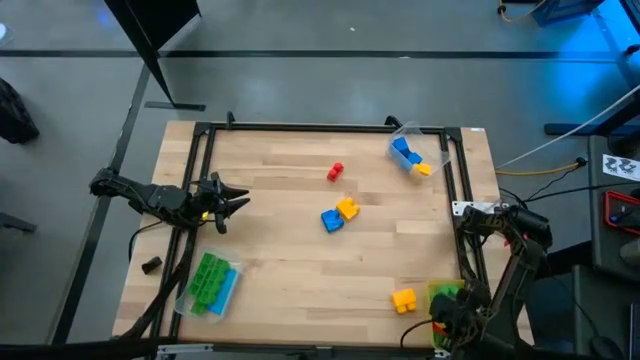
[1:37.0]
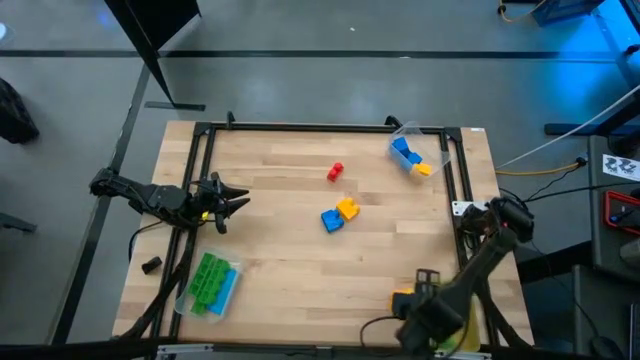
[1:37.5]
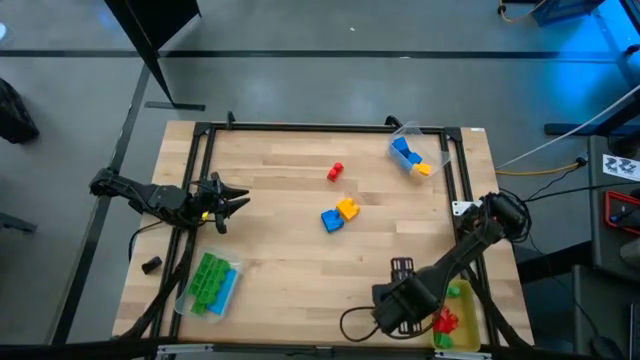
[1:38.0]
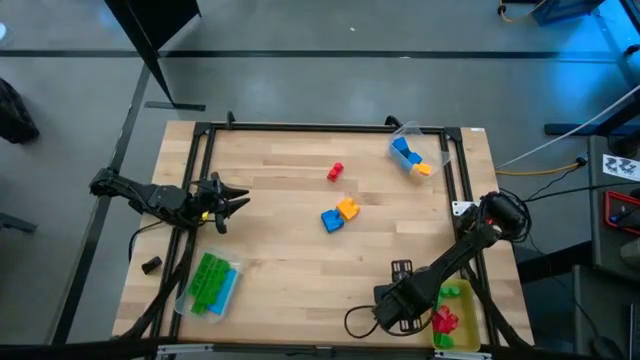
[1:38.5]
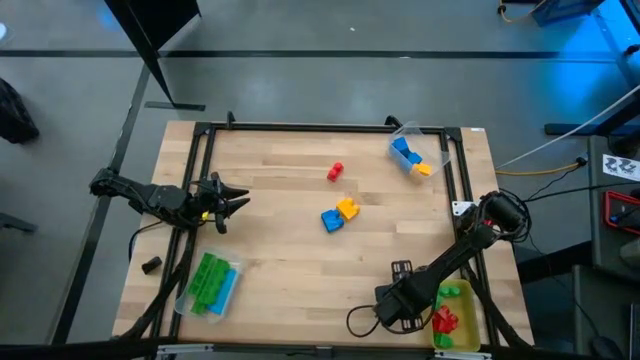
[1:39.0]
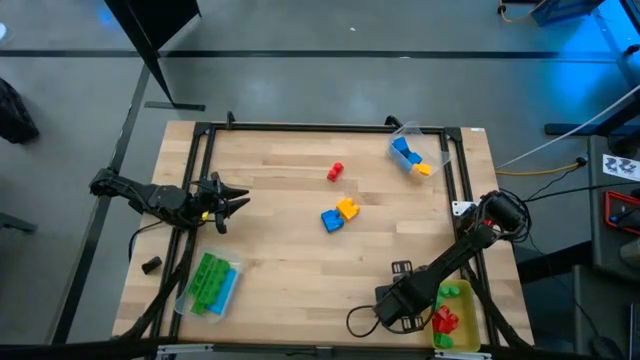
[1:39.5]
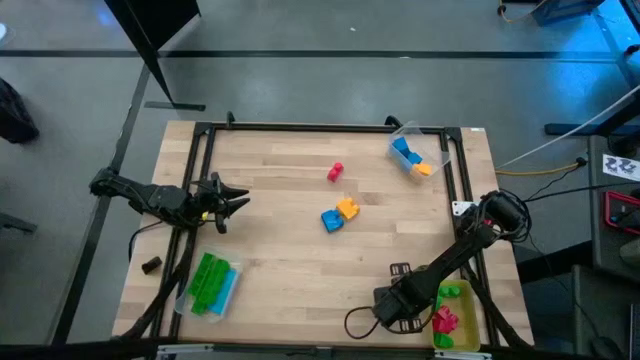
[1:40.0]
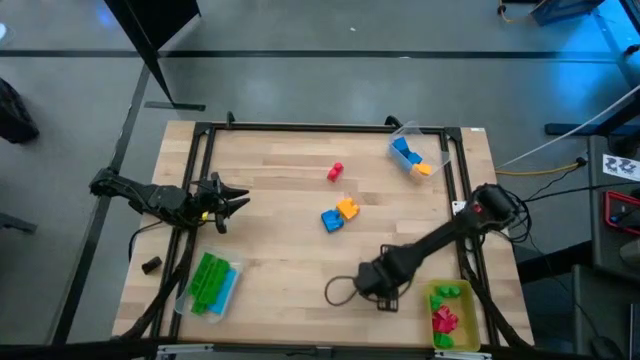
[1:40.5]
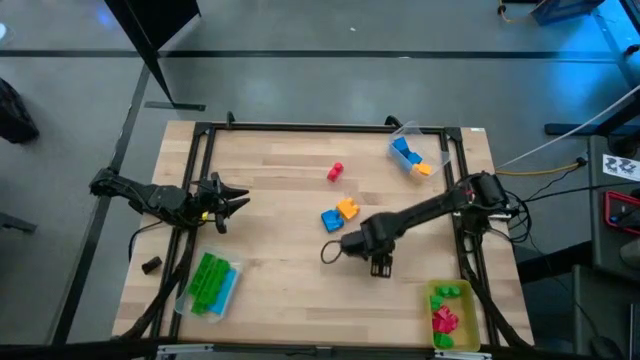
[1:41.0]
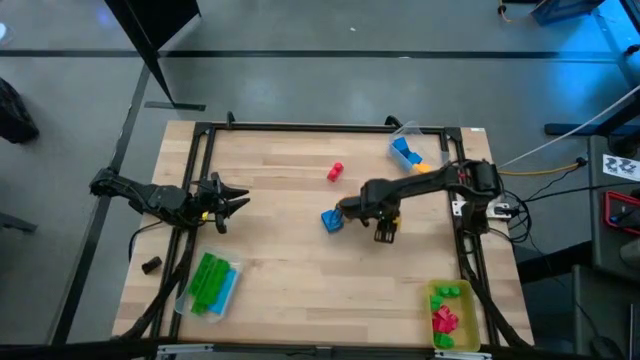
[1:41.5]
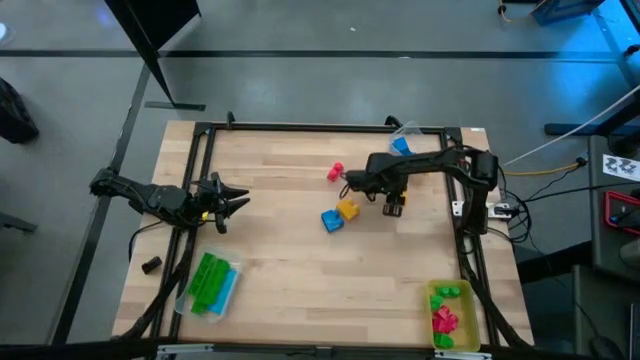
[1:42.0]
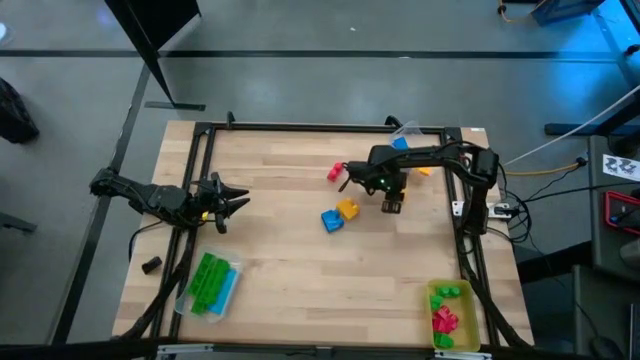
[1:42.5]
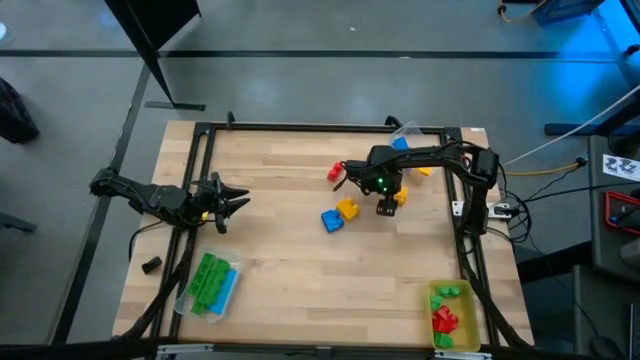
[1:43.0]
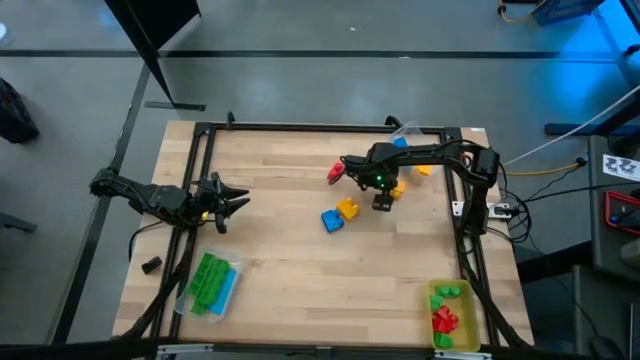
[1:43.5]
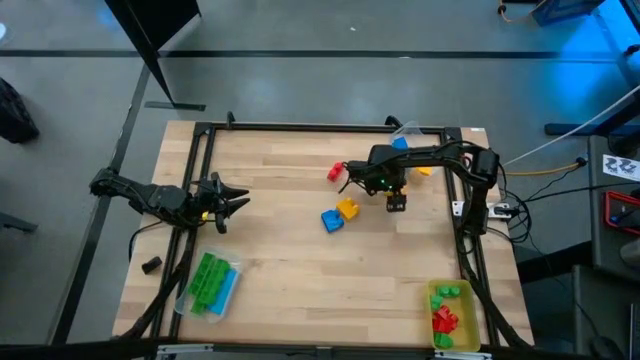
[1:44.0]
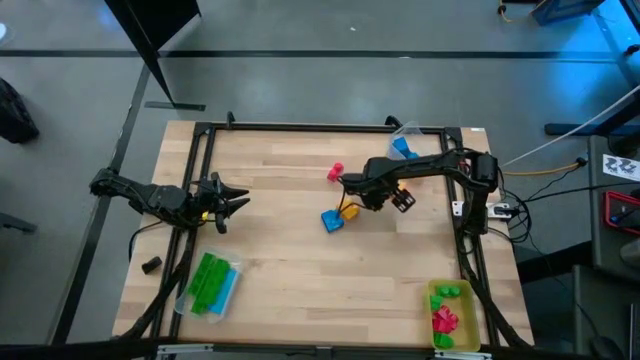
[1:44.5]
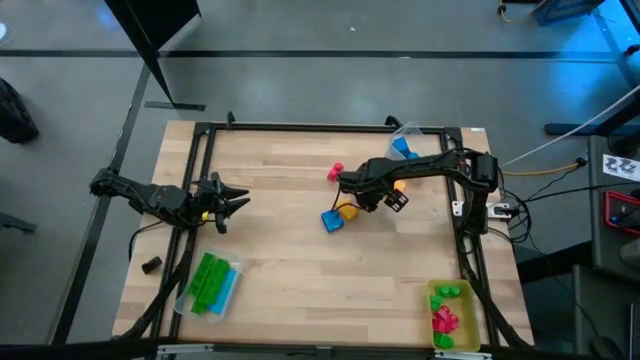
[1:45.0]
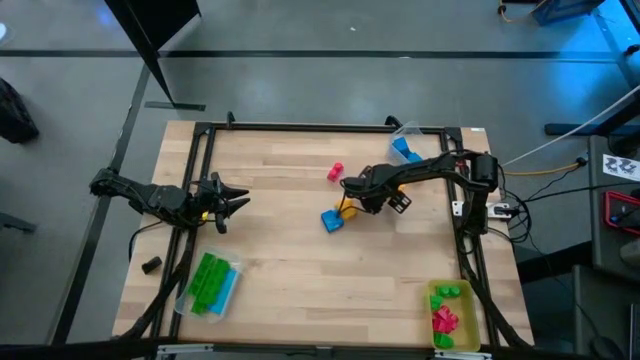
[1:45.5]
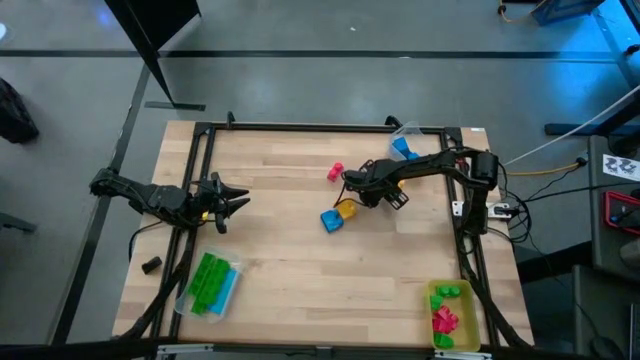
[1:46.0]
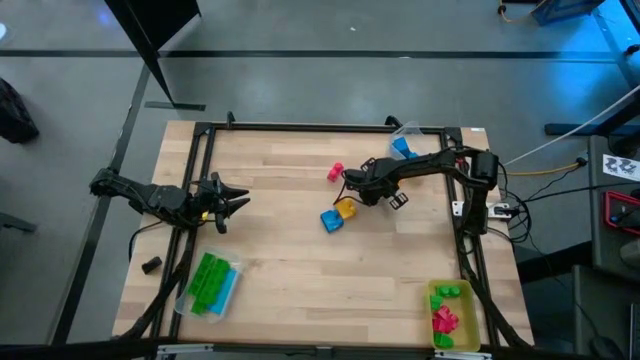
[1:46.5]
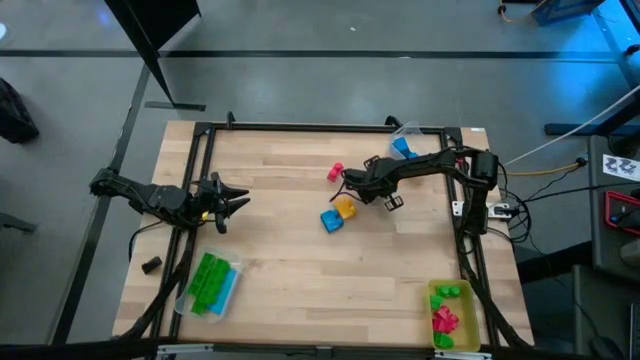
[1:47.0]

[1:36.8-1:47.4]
Task: Sort blocks by size
Put the bottom 2 stud yellow game piece into the top transparent bin

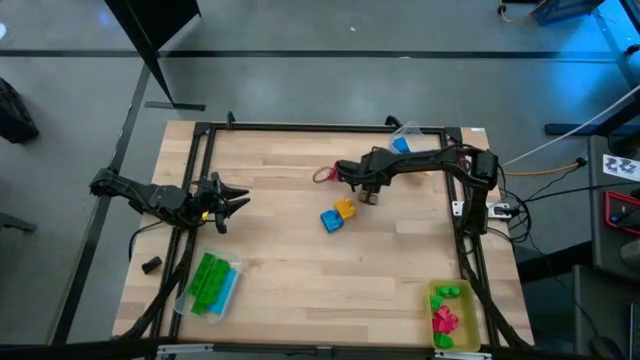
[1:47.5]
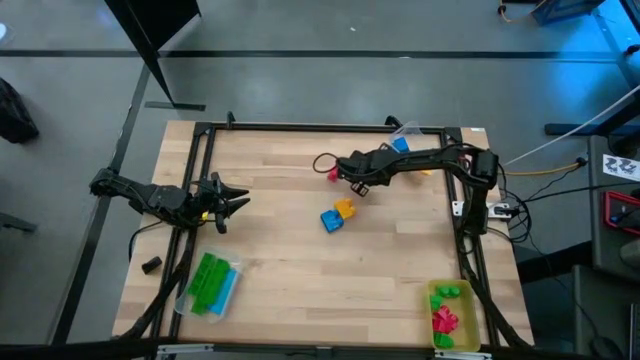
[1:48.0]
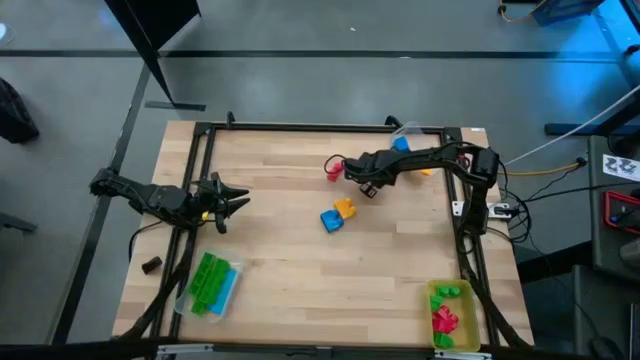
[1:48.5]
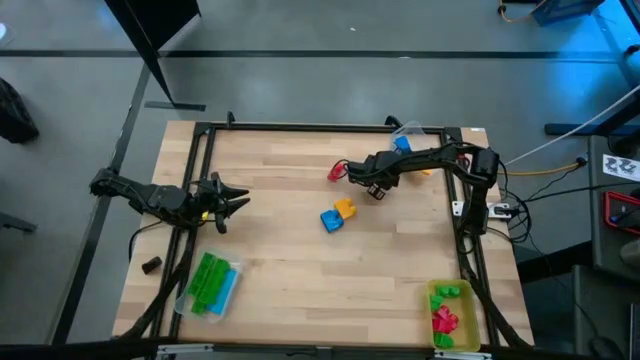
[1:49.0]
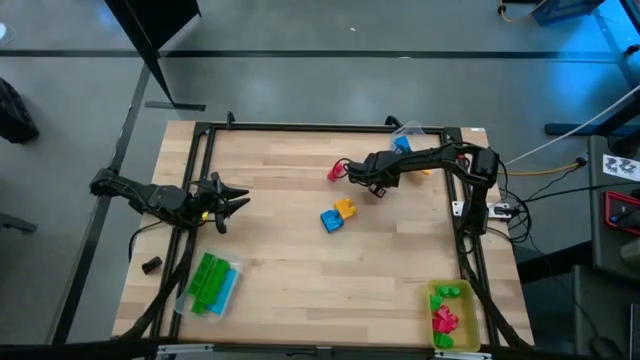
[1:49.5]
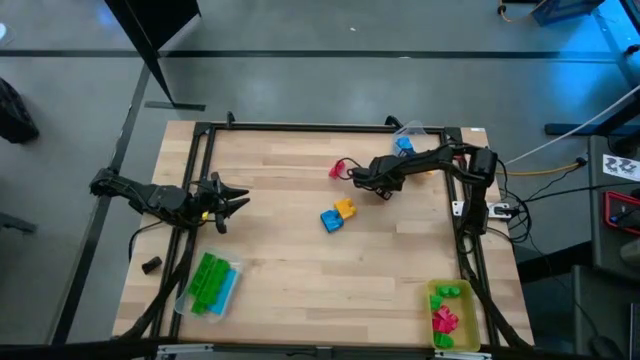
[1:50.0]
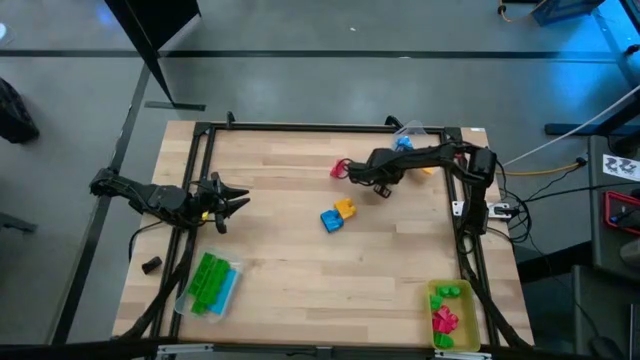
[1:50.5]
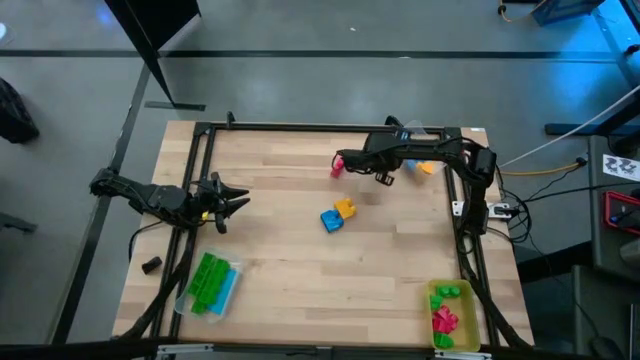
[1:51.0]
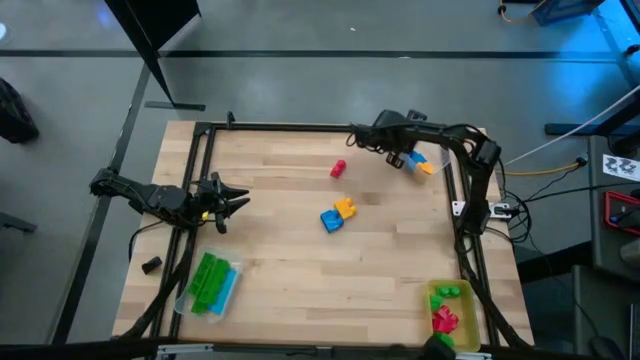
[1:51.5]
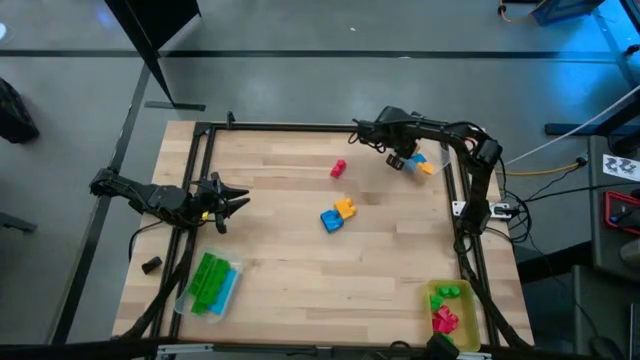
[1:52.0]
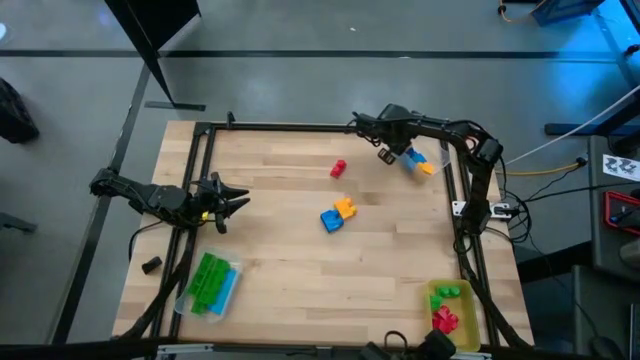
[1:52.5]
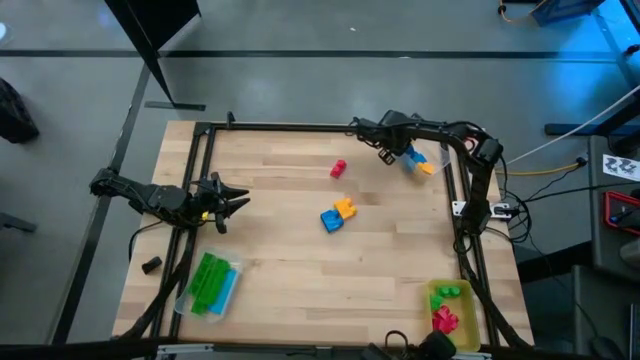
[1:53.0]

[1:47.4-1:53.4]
Put the top 2 stud yellow game piece into the top transparent bin

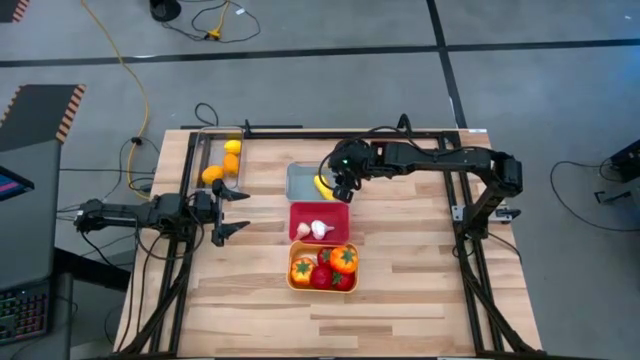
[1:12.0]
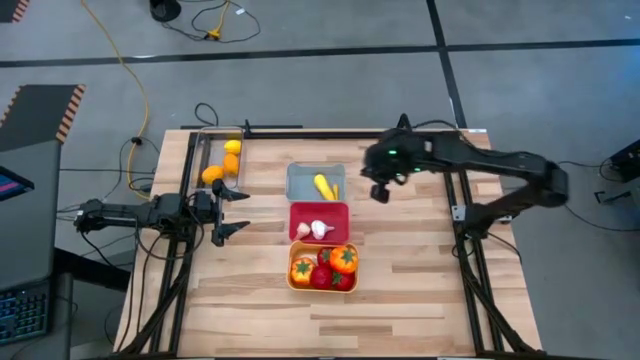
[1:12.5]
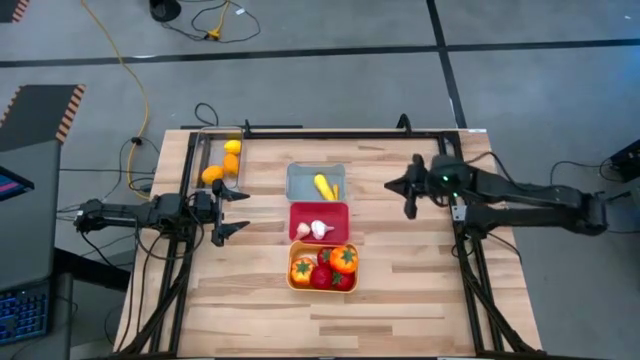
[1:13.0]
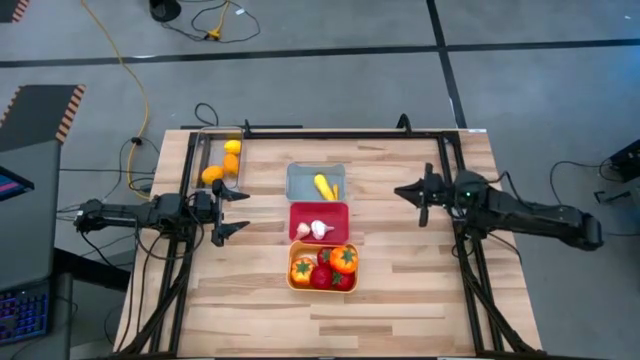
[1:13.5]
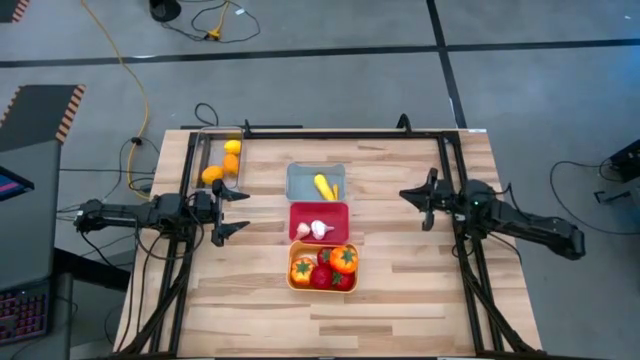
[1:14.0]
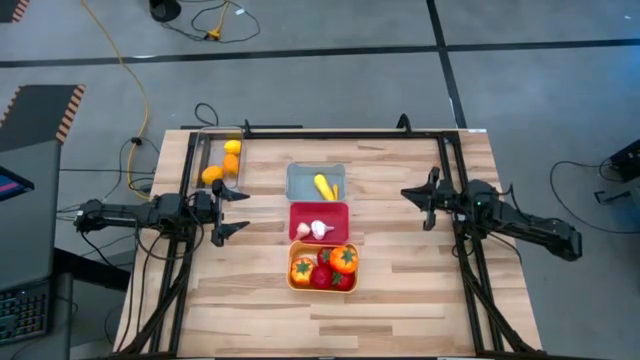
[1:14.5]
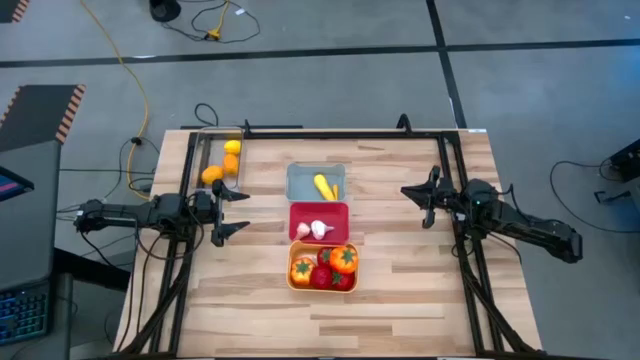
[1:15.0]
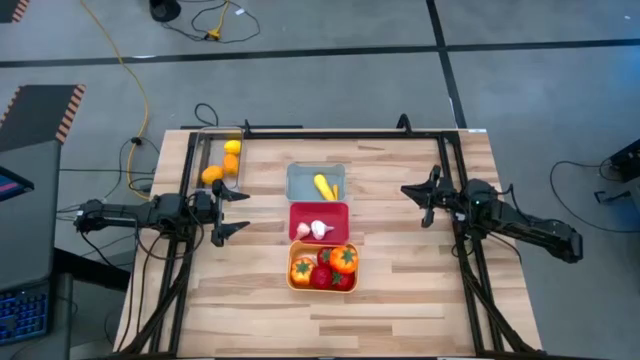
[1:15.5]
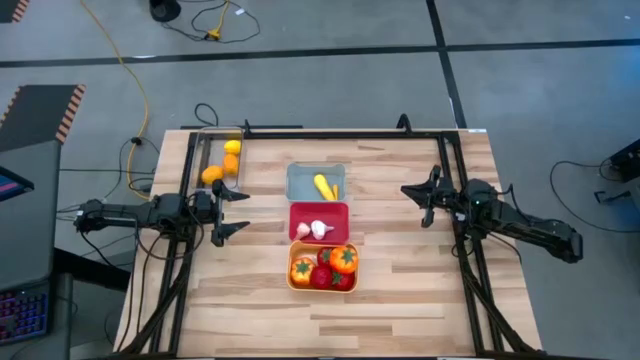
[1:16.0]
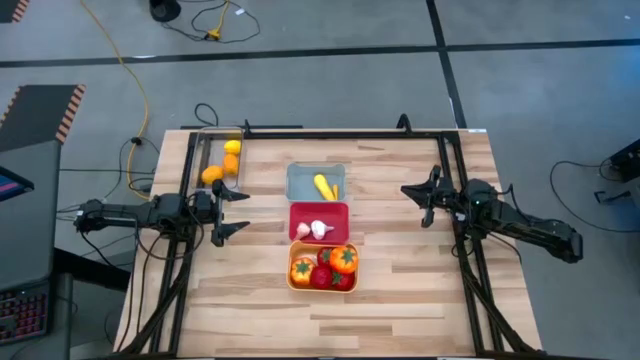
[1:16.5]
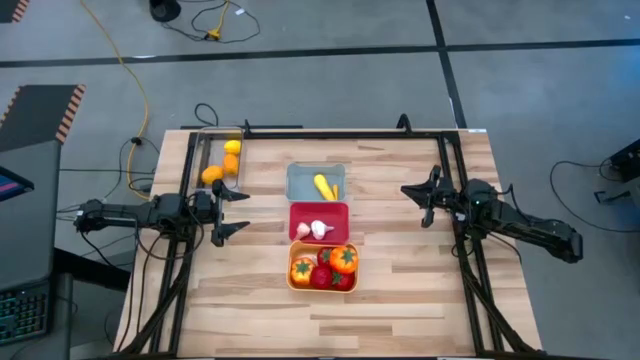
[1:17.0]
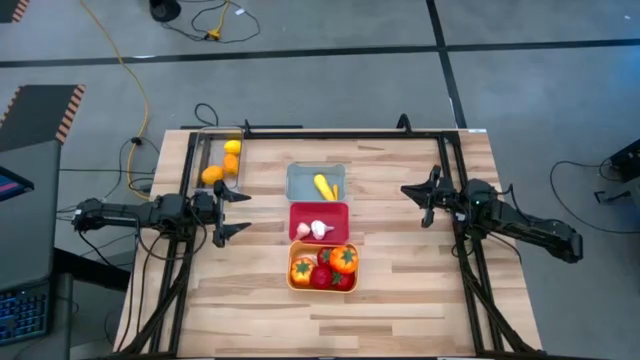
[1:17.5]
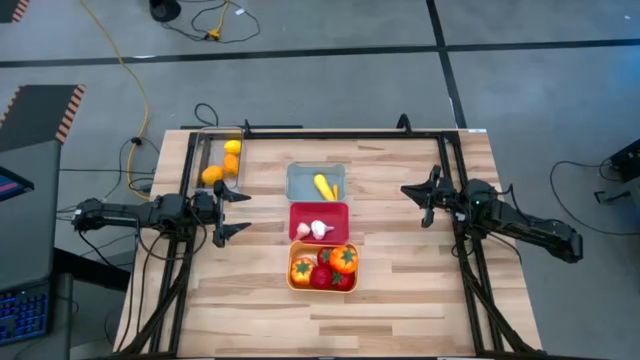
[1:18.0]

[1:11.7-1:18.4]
Task: Sort produce into baskets
Return to Home Position
